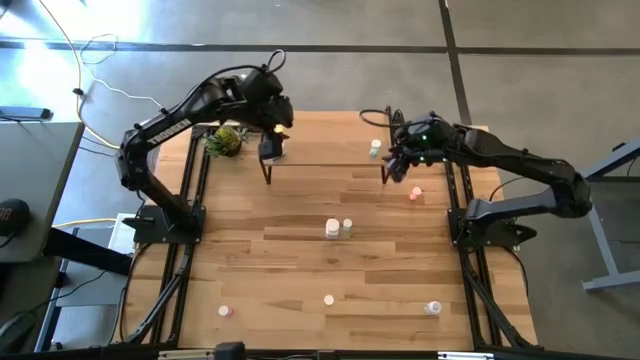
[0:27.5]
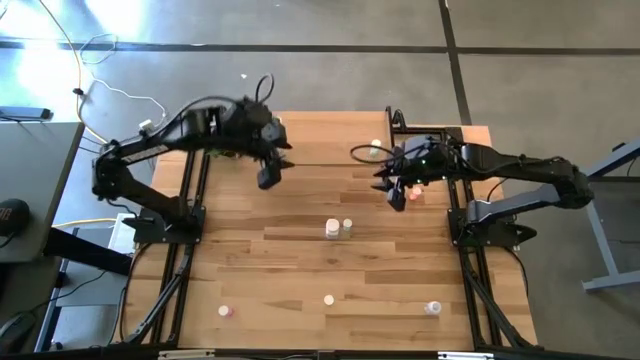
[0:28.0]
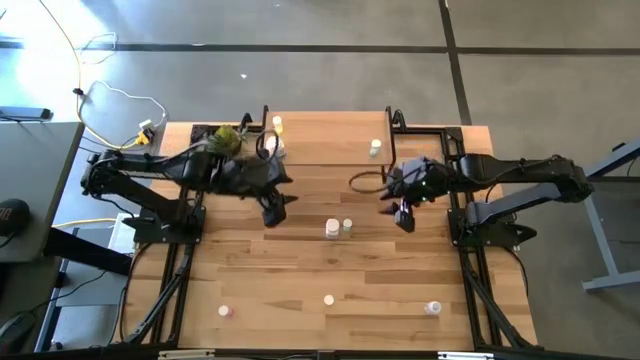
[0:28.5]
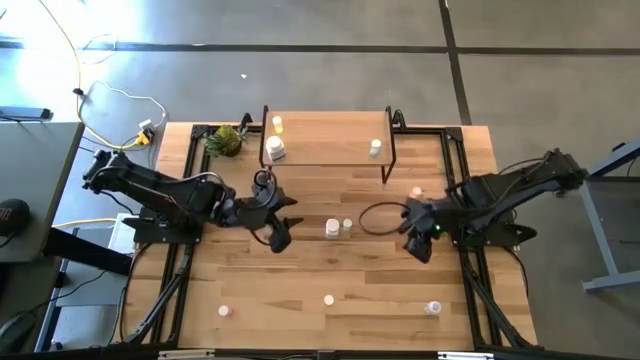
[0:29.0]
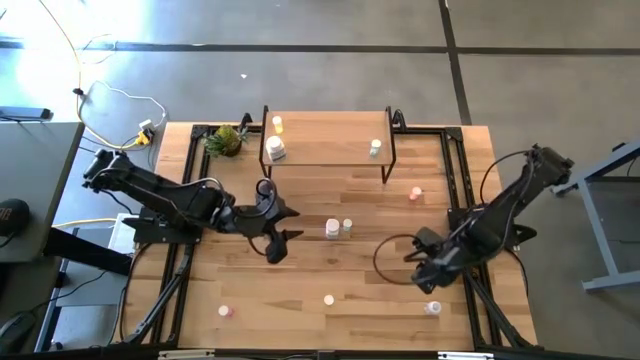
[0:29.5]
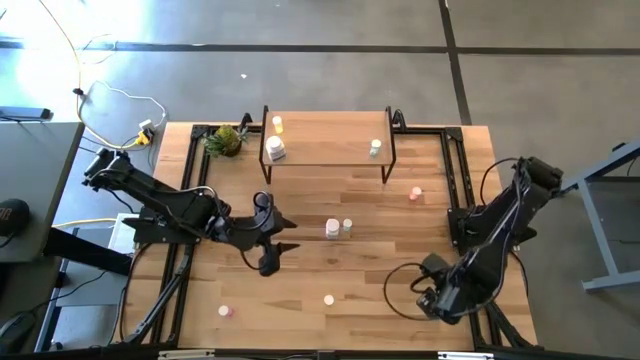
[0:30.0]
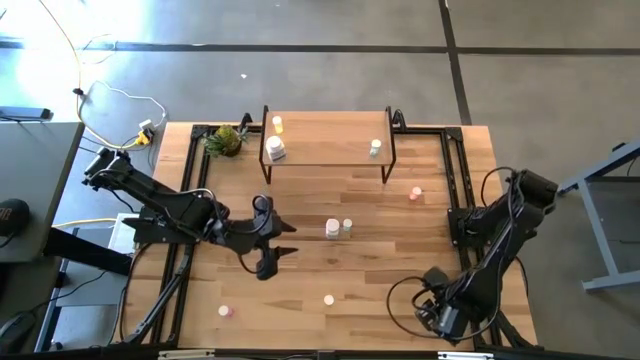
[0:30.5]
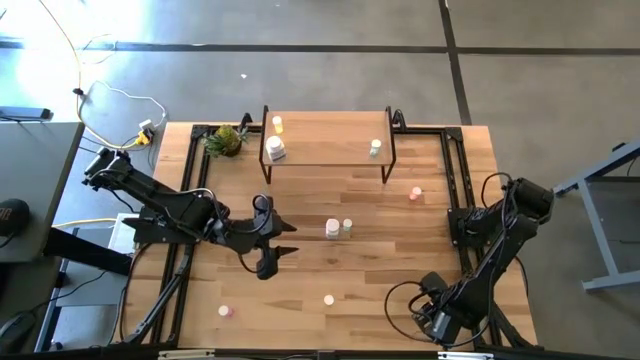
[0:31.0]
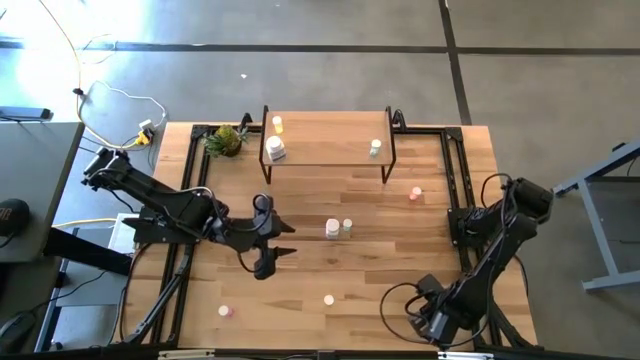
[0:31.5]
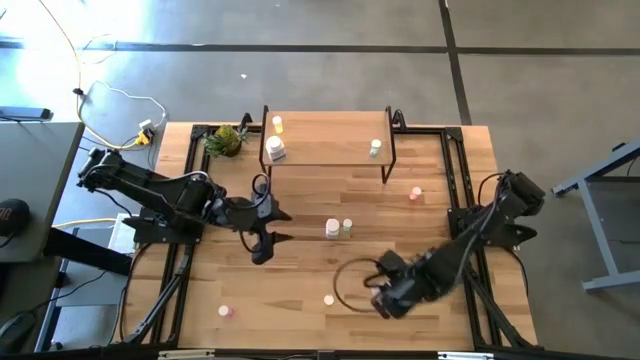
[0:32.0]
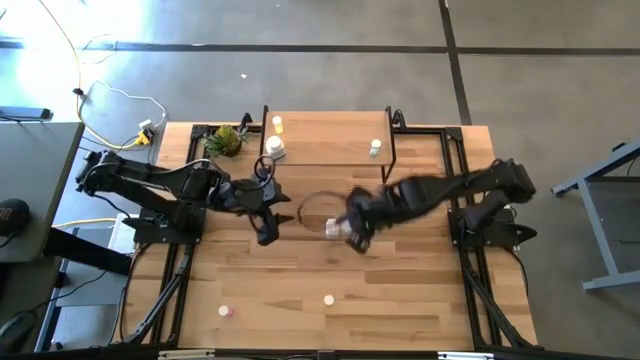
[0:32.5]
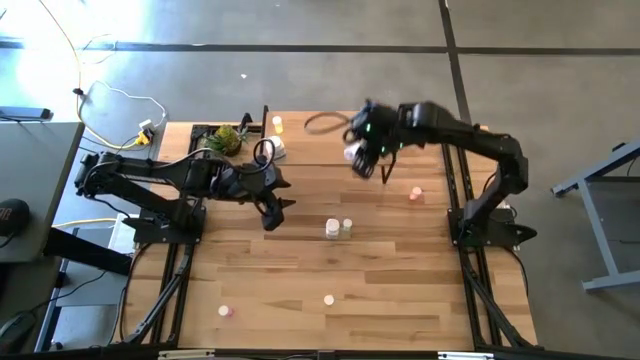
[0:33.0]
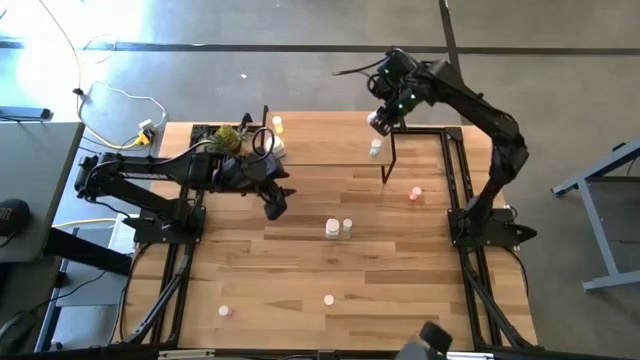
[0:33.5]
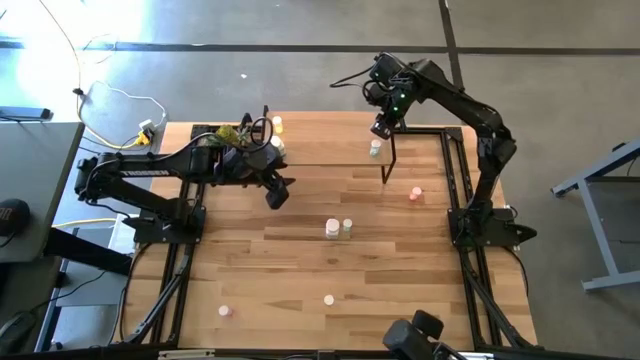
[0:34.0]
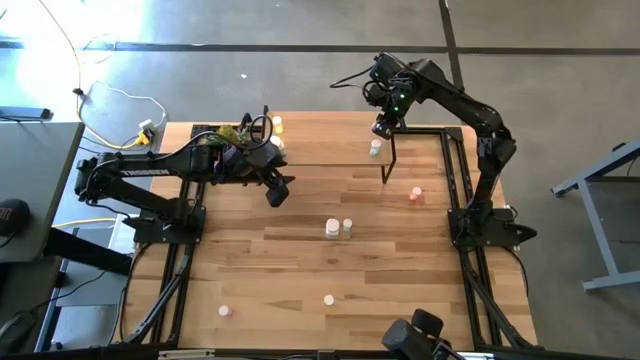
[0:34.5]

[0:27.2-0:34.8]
Task: Pick and place medicine bottles onto shelf by color
Put the transparent medicine bottle on the shelf

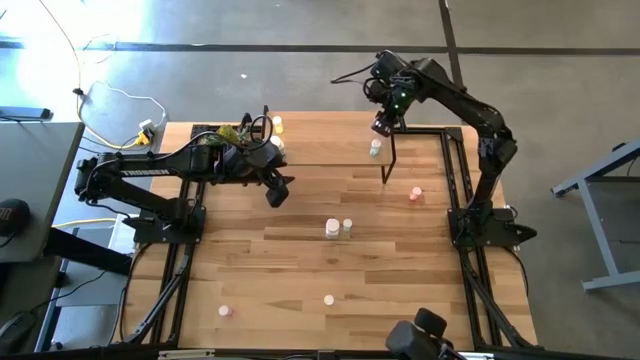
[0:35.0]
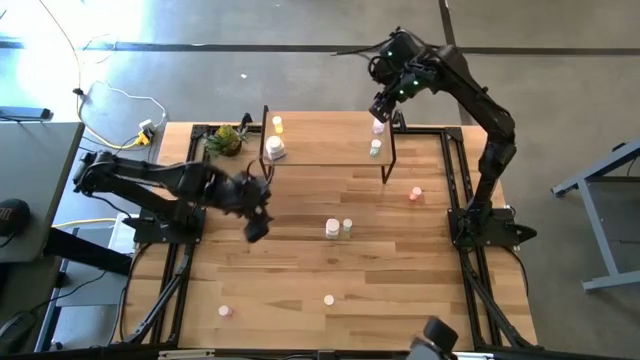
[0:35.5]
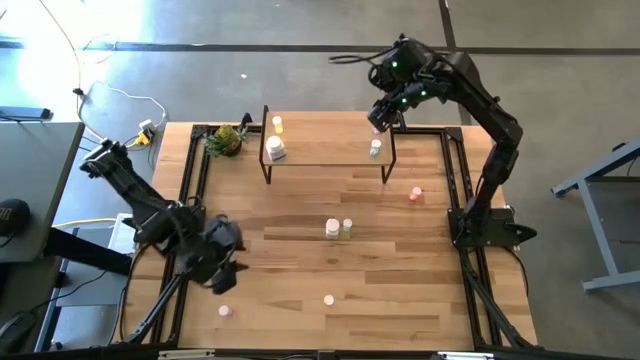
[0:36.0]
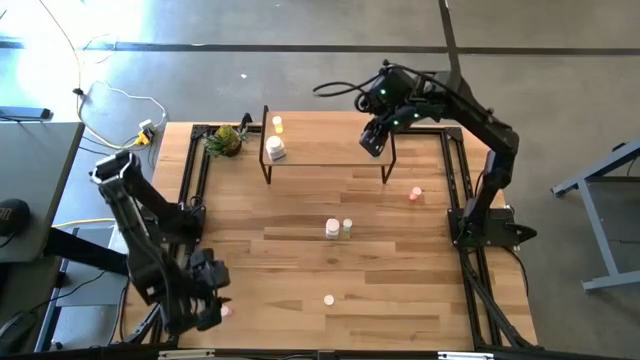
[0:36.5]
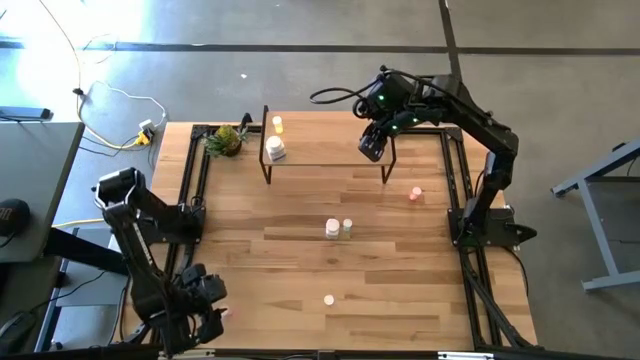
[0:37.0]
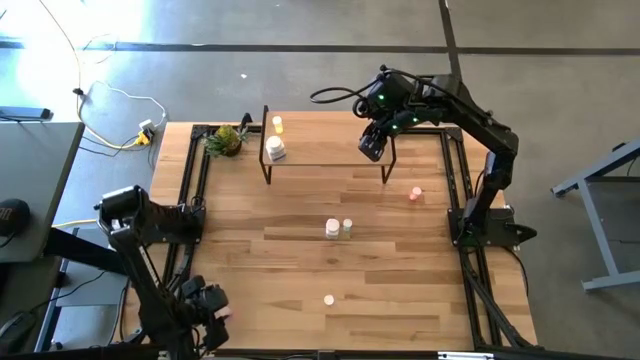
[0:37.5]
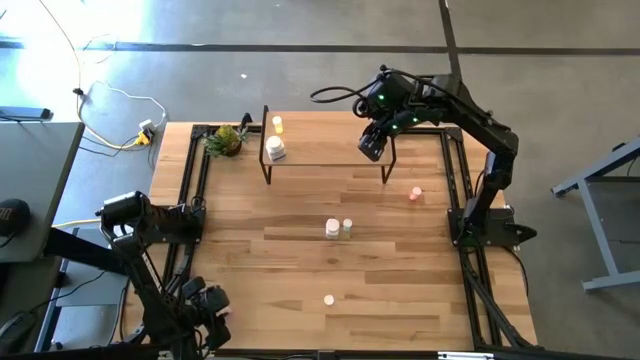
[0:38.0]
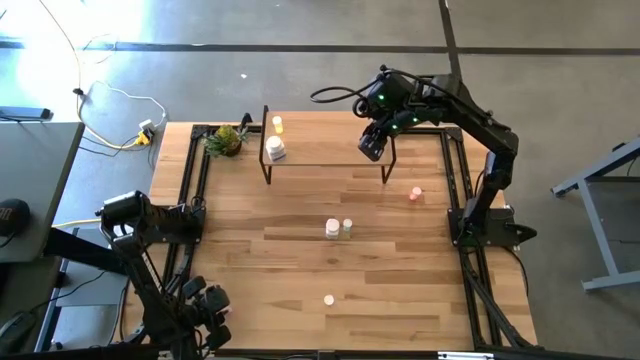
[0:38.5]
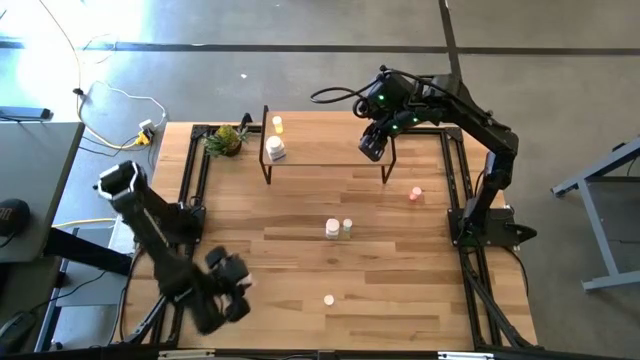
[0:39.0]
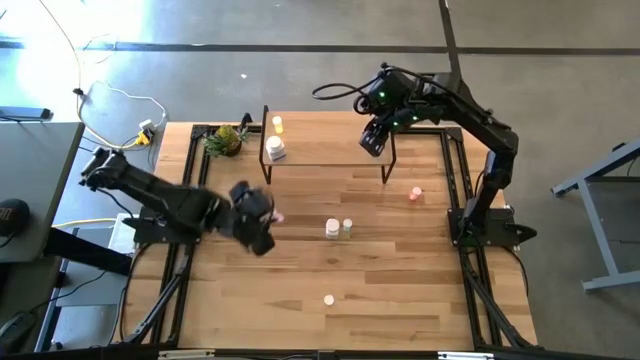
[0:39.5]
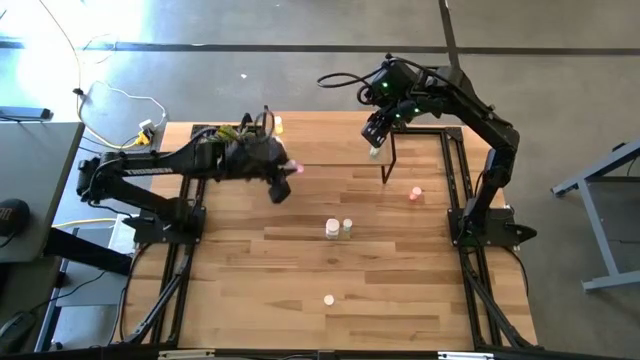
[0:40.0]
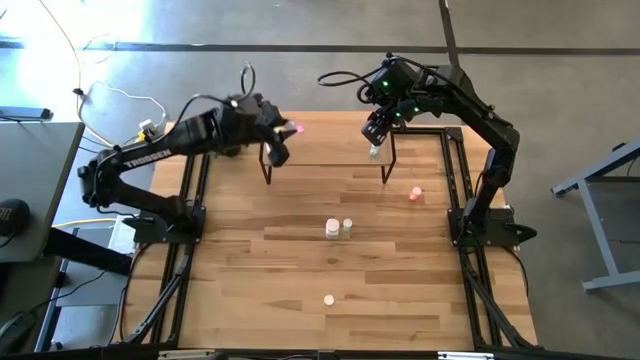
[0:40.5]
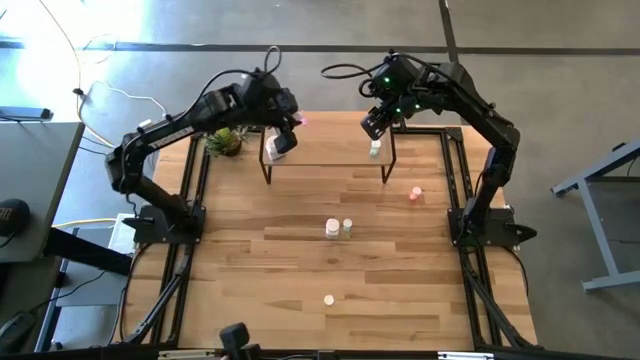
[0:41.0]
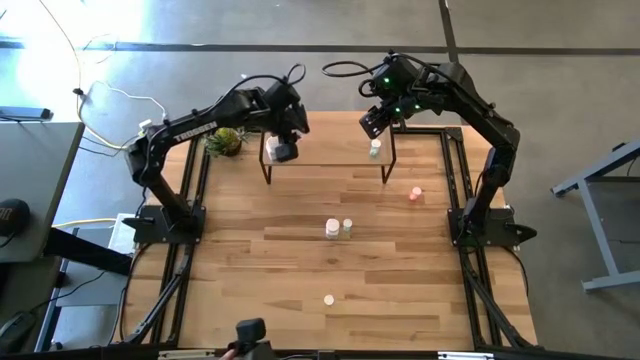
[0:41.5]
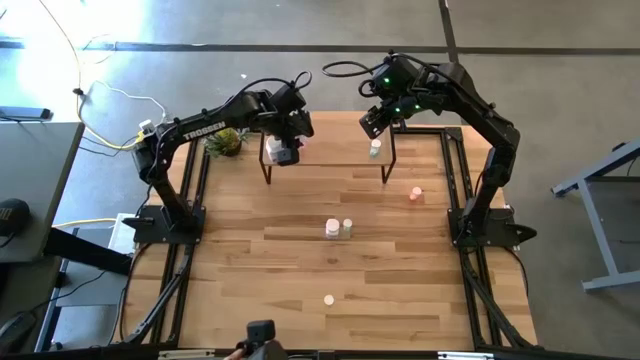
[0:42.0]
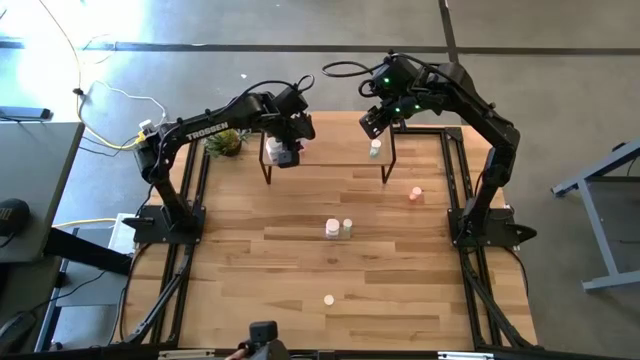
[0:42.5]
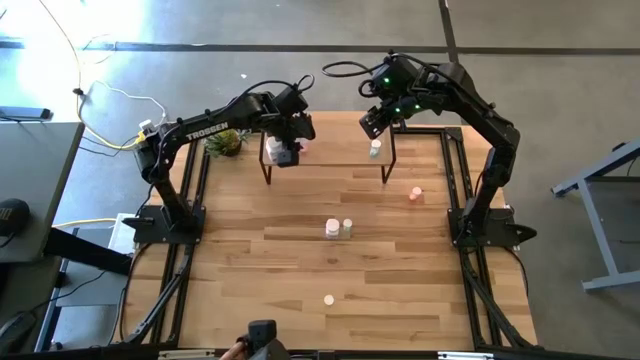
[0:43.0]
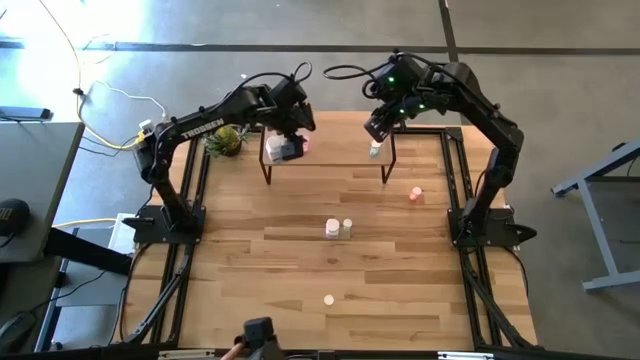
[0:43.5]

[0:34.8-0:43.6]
Put the pink medicine bottle on the shelf

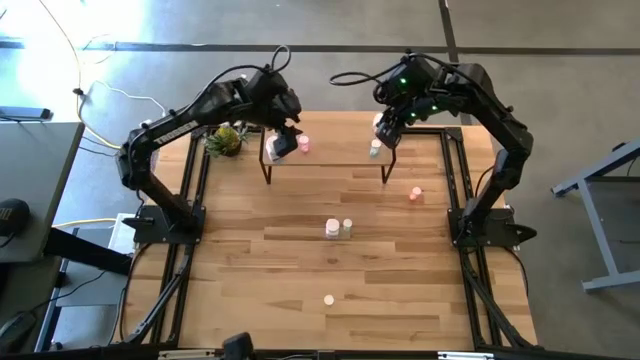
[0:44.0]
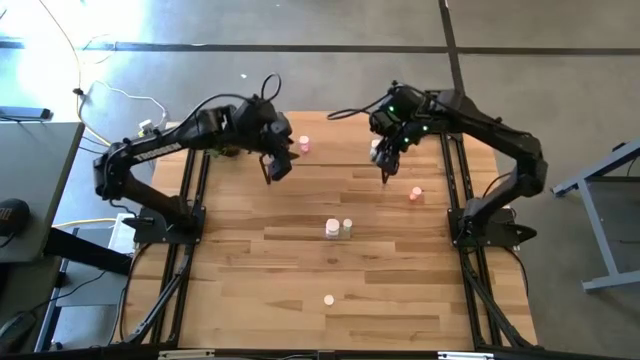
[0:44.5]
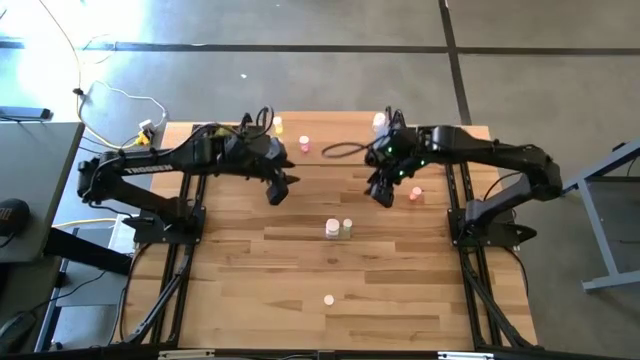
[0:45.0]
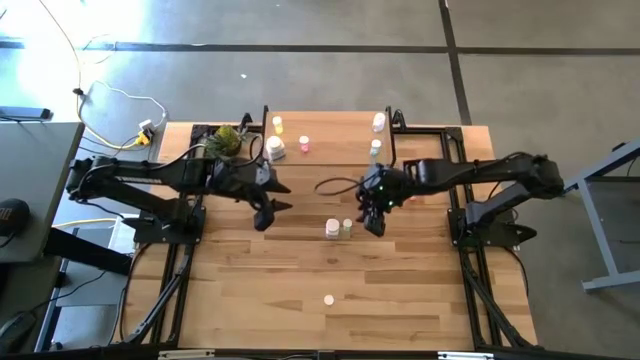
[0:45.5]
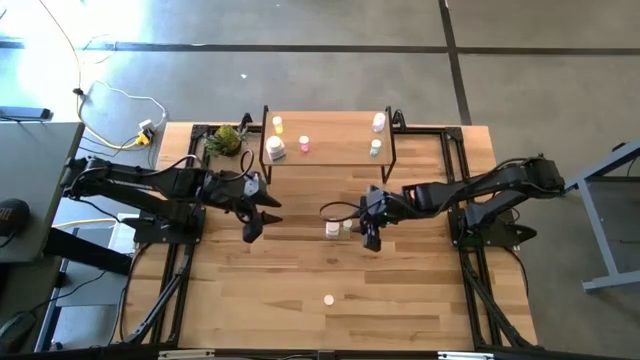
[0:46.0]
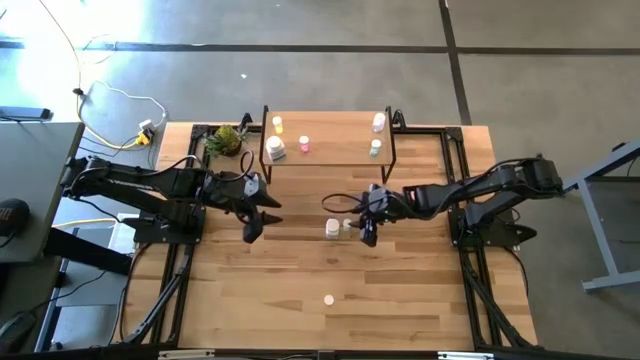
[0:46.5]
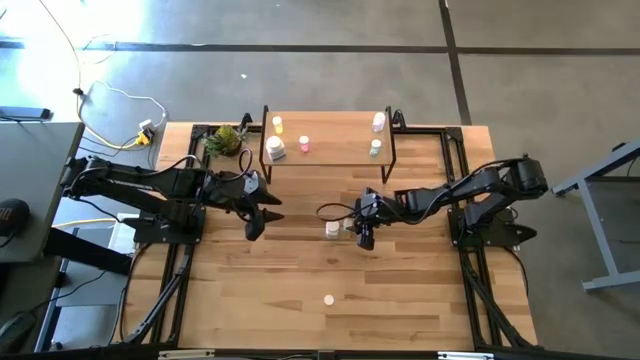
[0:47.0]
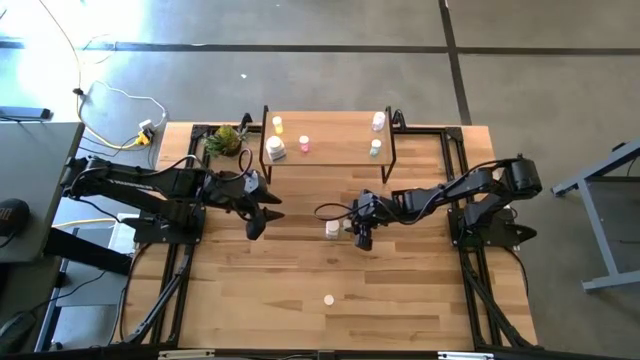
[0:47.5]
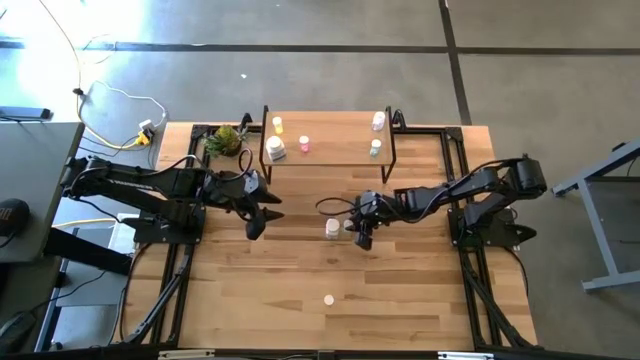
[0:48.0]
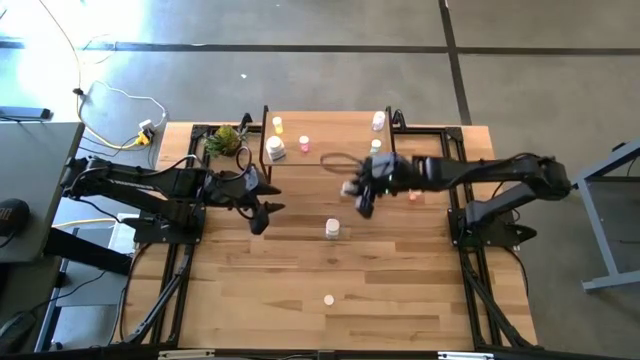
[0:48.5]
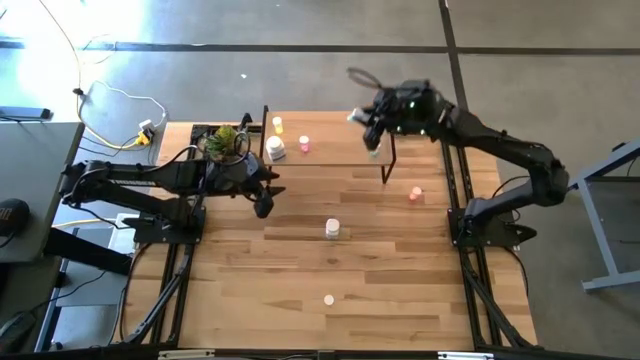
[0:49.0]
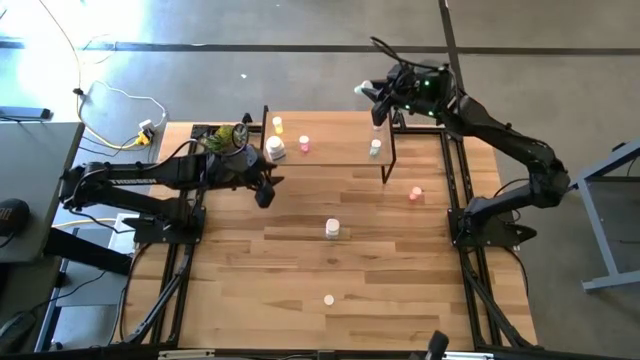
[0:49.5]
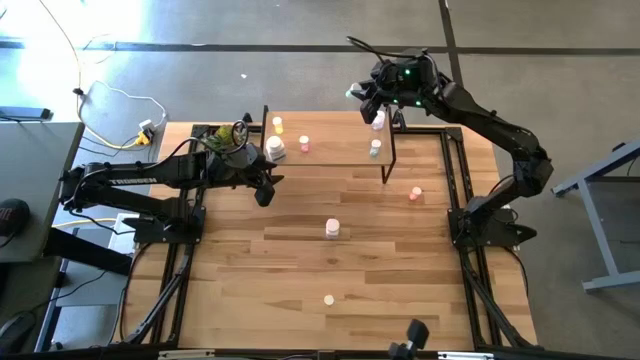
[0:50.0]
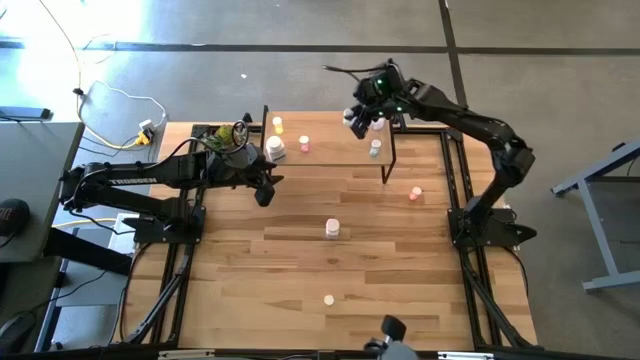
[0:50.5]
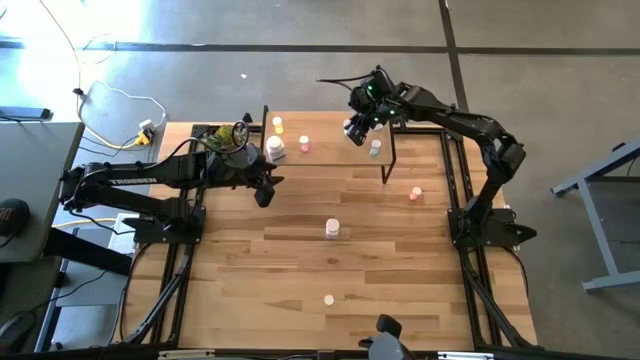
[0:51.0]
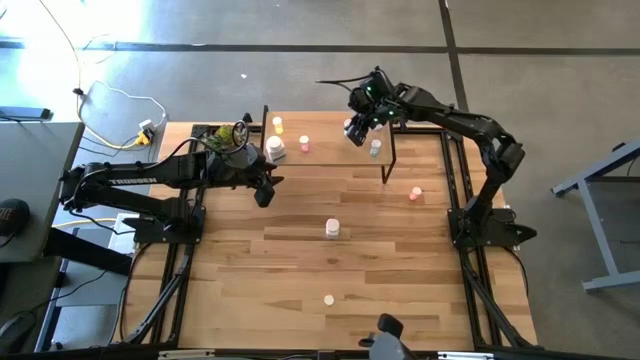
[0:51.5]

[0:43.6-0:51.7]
Put the green medicine bottle on the shelf
